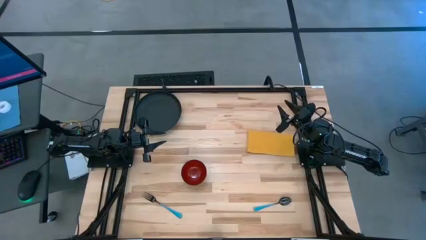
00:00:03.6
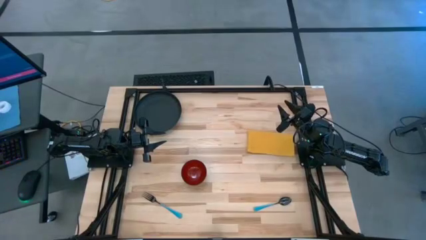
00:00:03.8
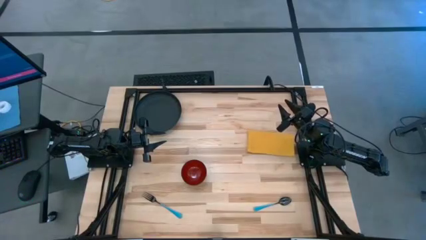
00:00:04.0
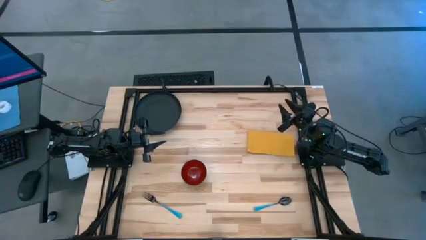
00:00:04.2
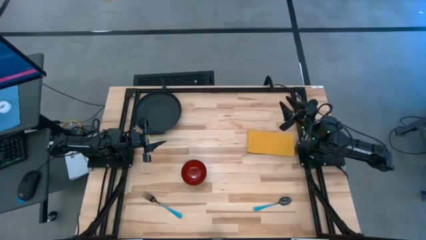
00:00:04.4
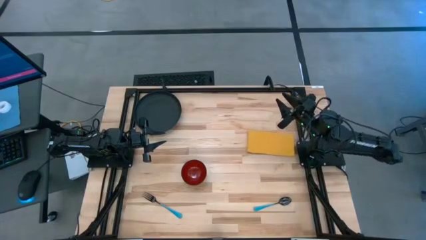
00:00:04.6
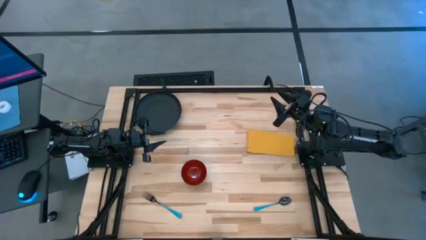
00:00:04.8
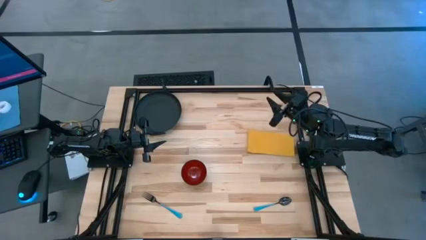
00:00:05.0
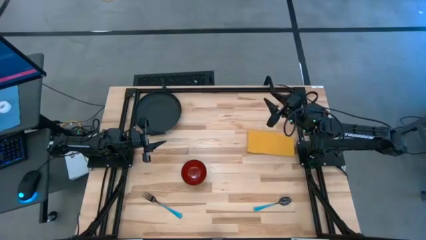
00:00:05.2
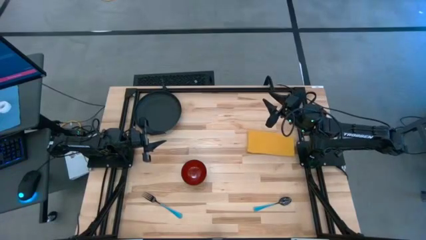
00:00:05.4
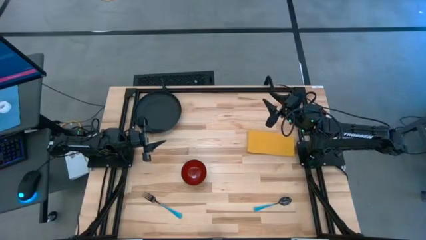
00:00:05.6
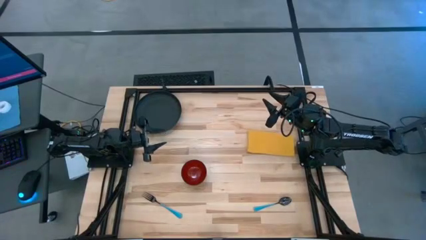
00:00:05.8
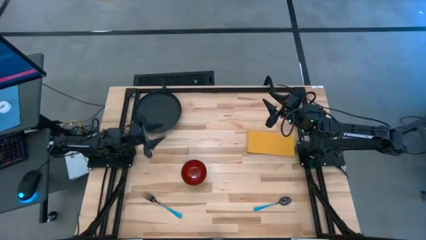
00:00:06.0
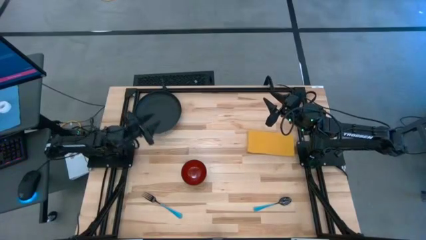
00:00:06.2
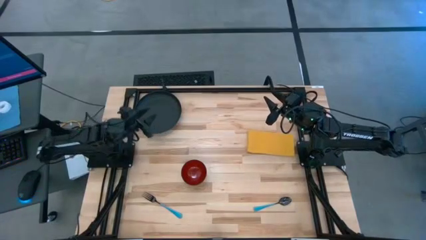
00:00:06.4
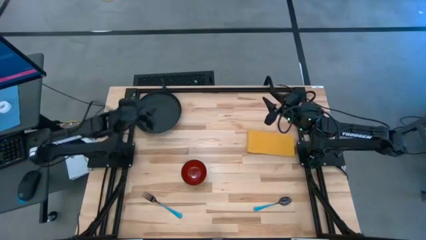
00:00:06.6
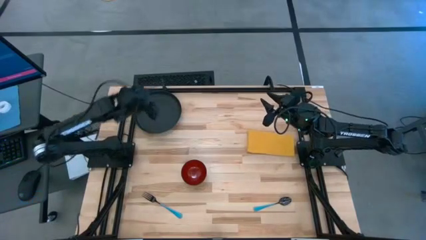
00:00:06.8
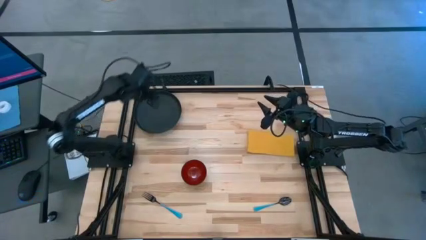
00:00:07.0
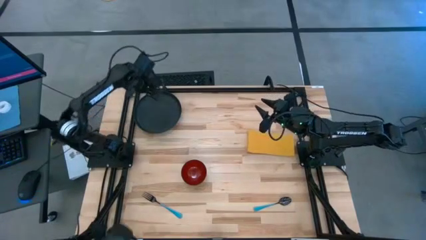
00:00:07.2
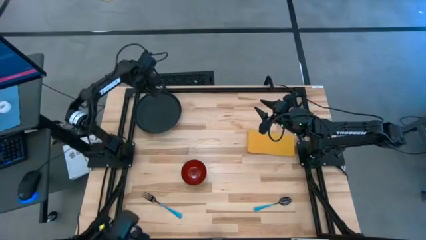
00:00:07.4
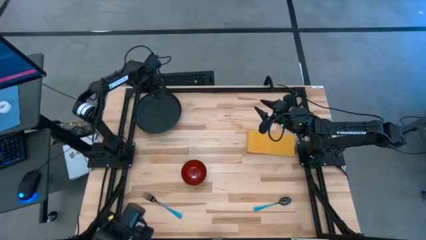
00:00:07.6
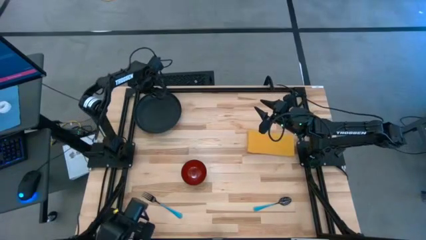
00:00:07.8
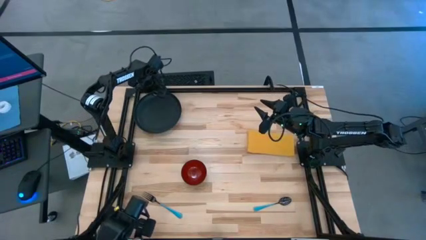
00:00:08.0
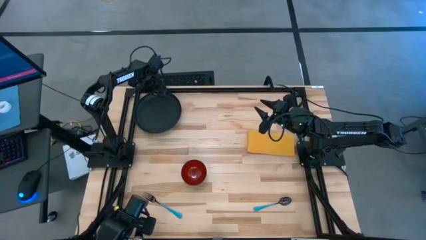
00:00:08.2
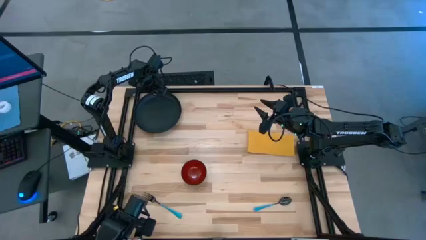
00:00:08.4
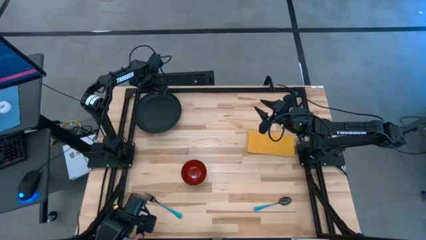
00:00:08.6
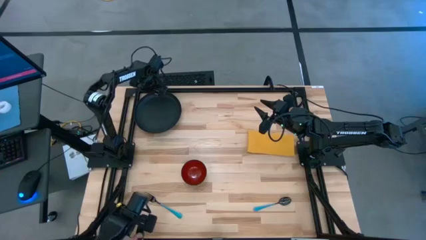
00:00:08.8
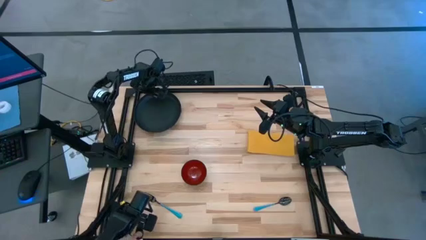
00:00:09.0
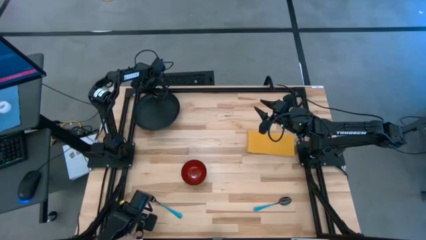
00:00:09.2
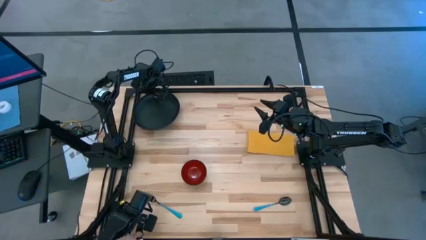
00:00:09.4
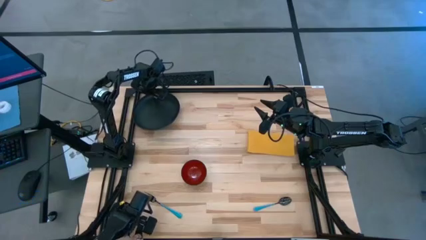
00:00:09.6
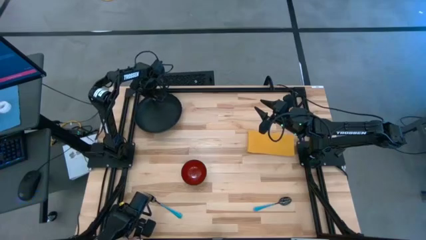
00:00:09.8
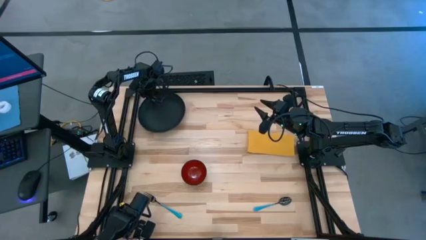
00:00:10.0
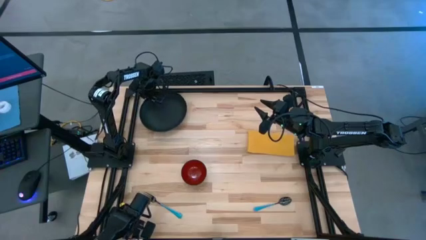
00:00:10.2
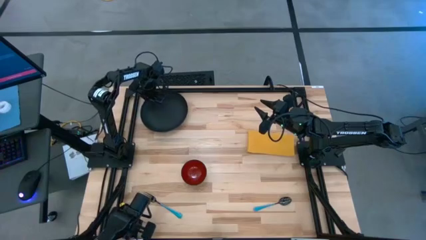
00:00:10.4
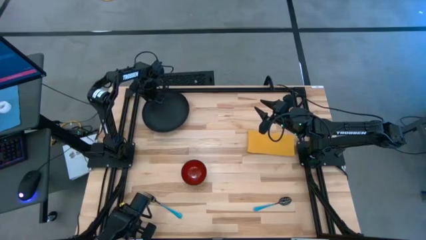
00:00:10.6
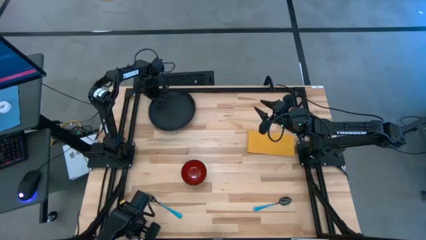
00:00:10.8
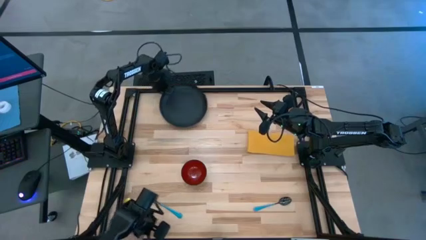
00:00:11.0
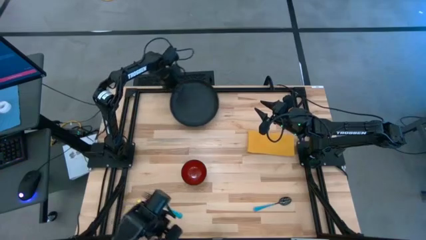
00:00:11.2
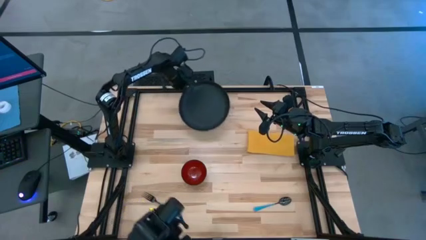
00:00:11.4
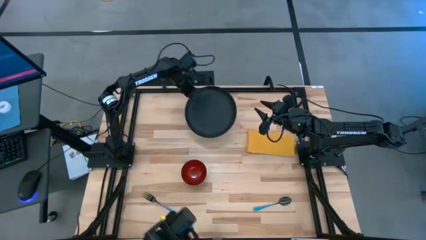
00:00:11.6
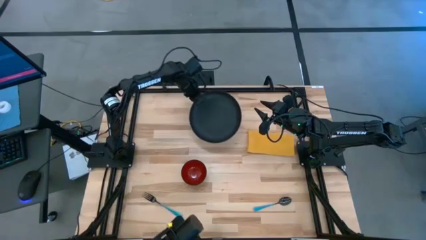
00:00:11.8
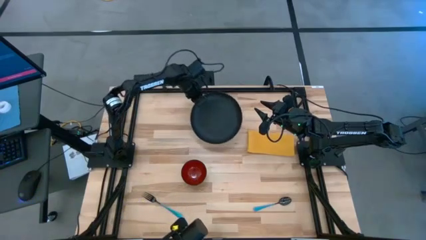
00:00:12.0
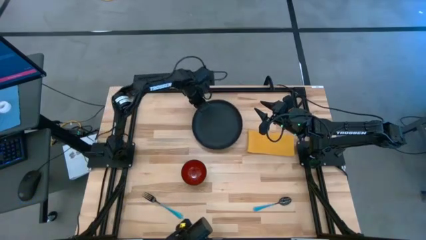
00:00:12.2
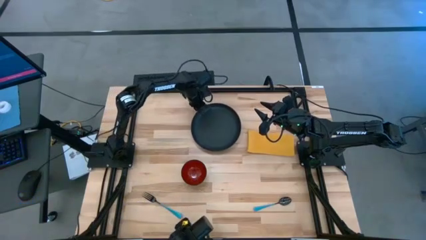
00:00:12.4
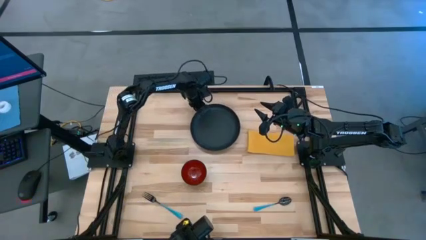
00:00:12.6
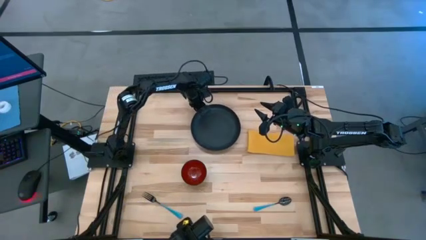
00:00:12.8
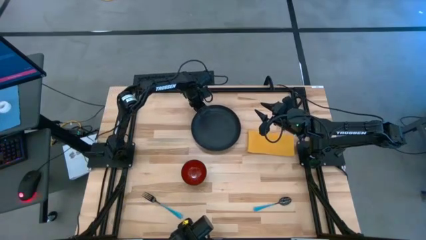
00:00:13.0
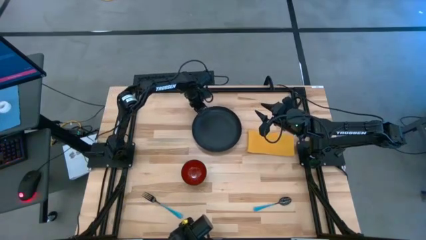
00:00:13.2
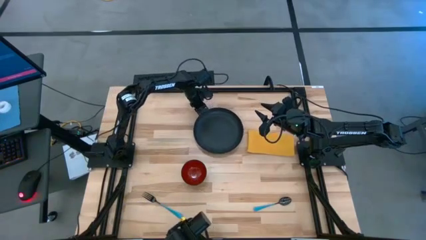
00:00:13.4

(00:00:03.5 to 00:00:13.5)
Task: Set table place
Move the black plate to the top center of the table

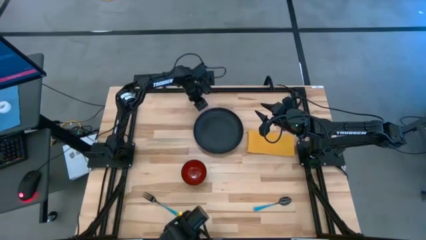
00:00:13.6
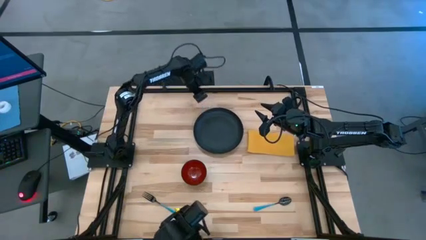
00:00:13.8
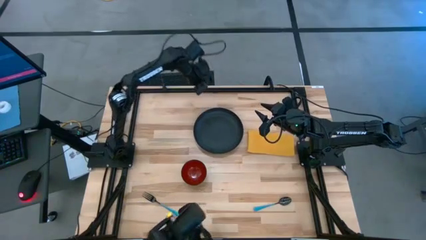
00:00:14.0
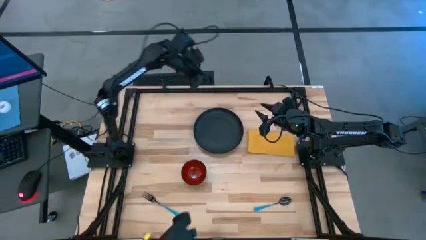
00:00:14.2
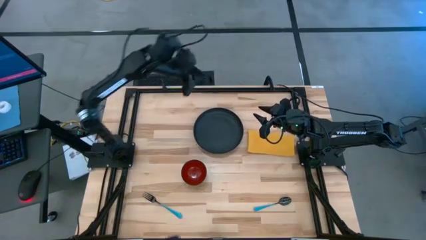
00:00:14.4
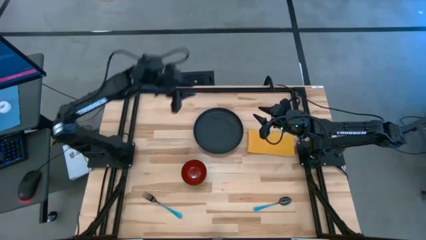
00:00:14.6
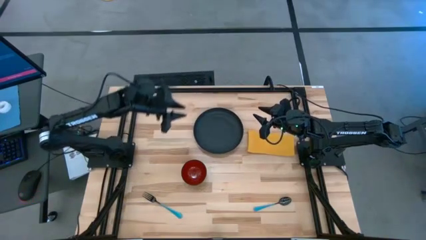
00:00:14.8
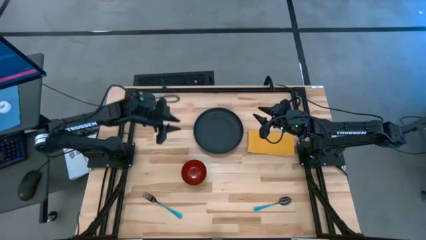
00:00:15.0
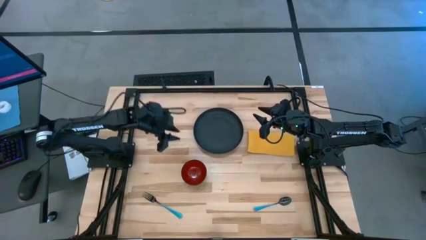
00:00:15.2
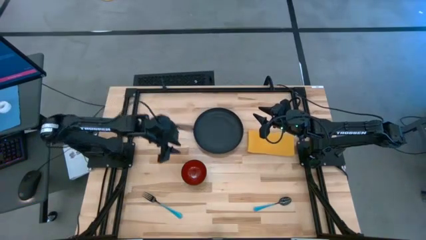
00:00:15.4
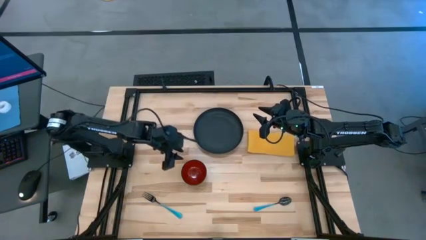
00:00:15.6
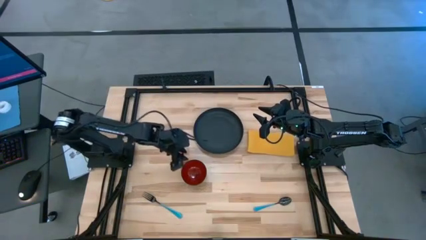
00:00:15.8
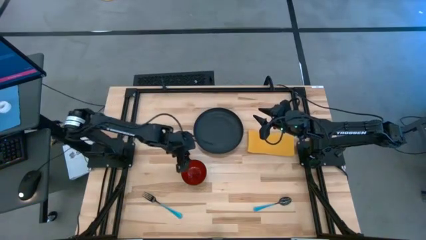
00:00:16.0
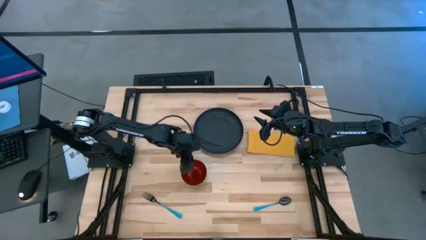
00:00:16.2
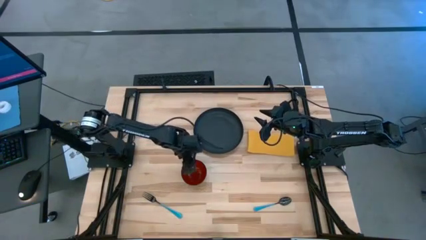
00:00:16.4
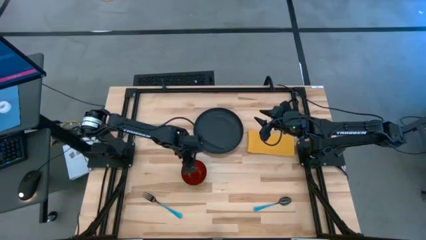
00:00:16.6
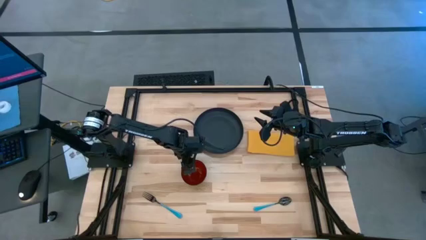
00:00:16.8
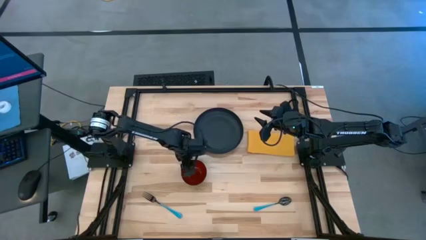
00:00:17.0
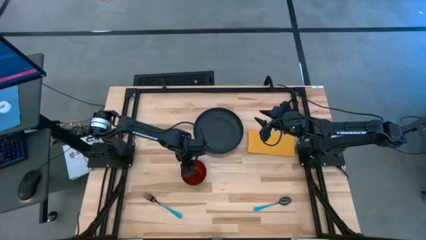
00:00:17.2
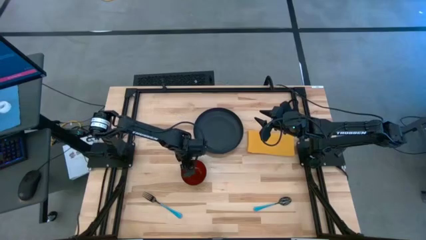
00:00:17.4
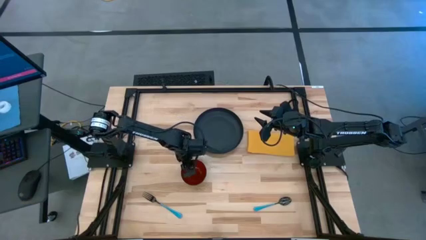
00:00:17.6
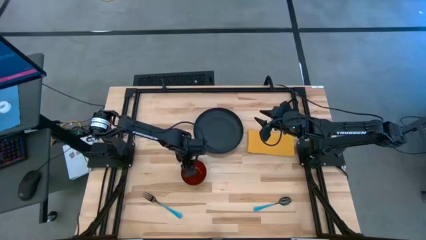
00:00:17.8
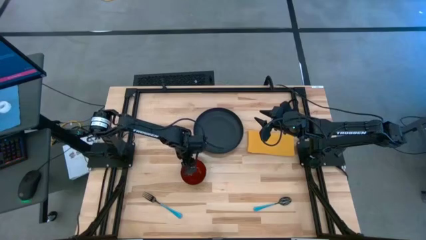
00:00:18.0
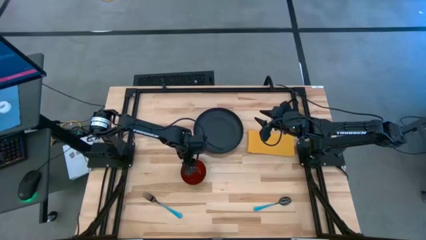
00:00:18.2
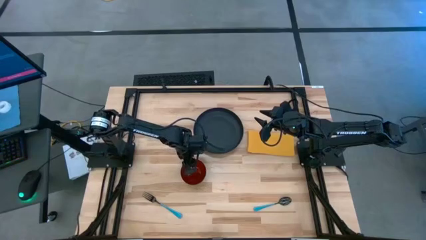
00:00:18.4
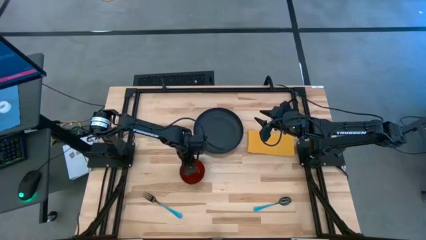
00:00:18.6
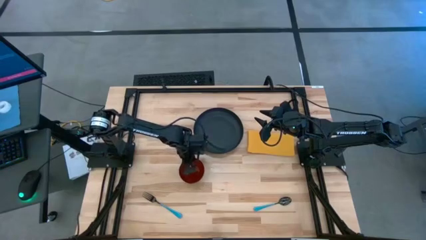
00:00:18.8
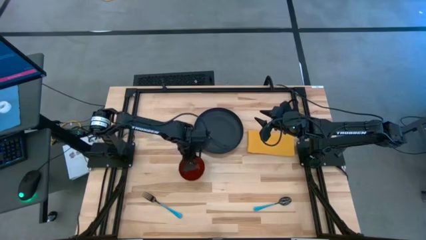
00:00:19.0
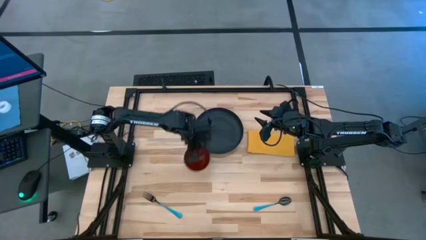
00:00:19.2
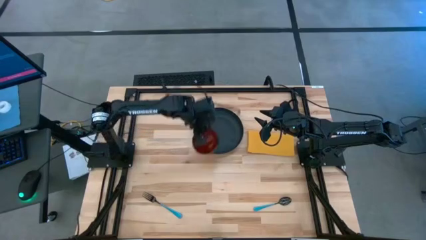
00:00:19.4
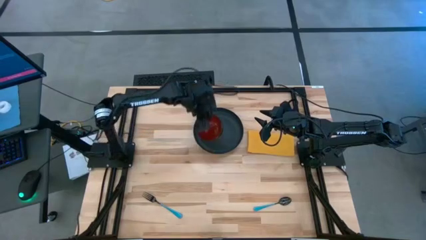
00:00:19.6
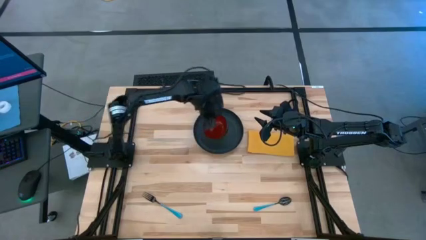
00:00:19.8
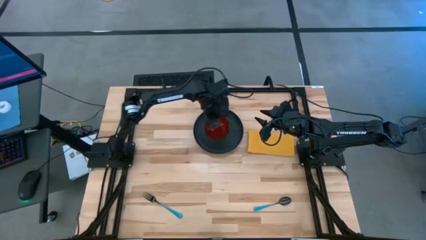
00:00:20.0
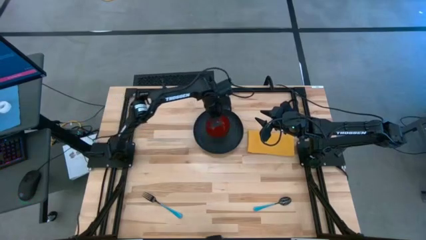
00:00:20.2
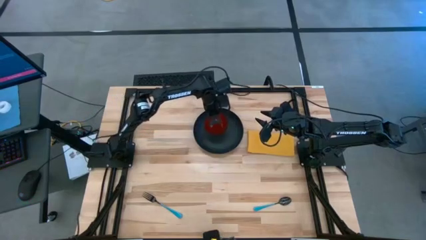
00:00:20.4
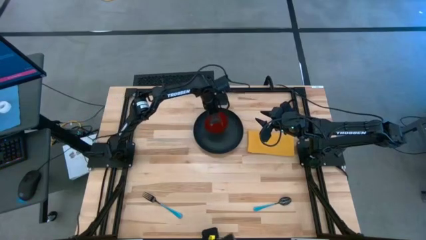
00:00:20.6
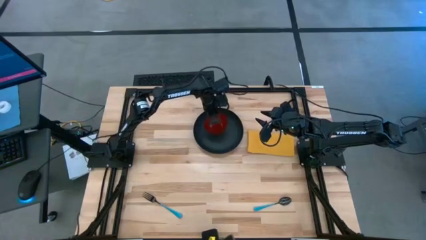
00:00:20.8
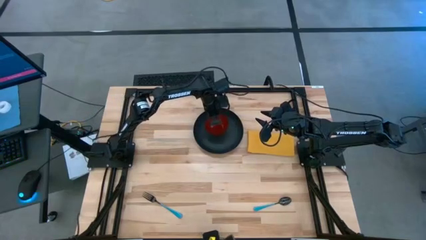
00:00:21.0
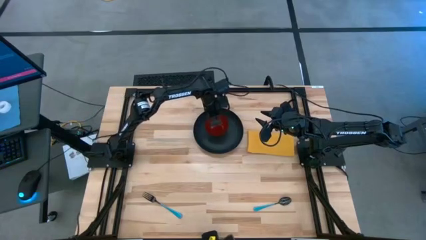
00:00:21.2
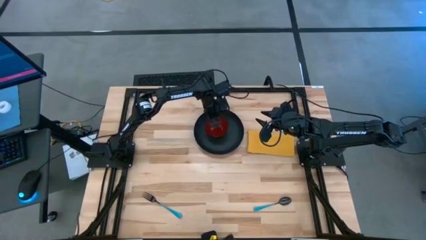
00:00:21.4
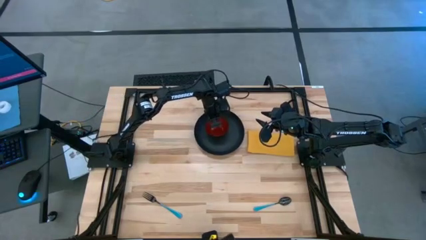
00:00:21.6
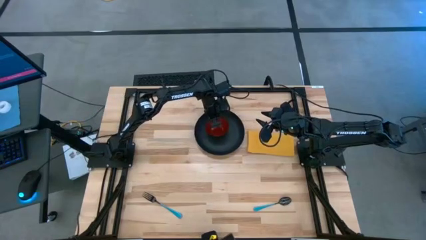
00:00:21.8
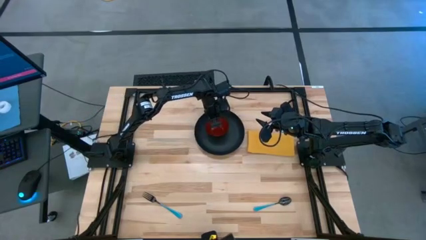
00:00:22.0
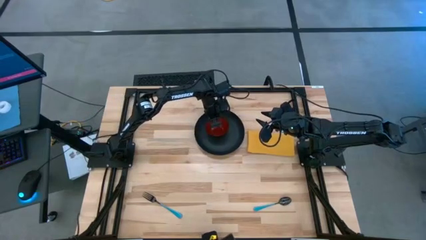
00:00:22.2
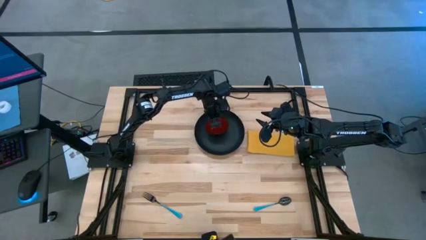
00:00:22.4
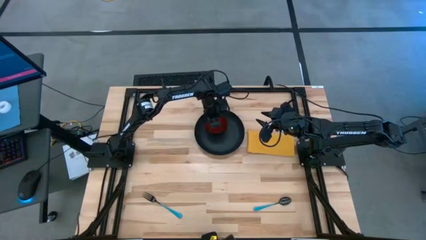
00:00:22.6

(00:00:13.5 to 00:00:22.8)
Put the red bowl on the black plate
